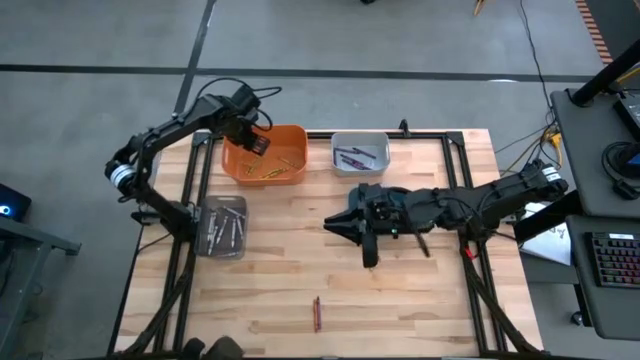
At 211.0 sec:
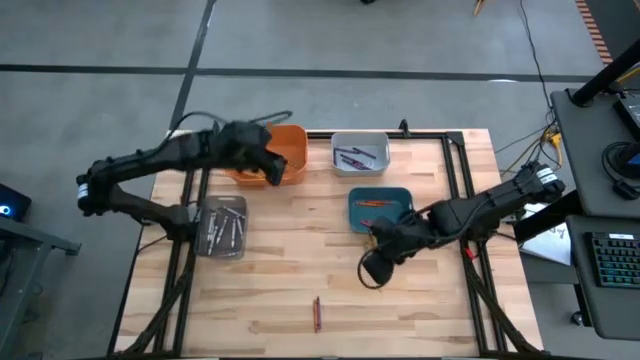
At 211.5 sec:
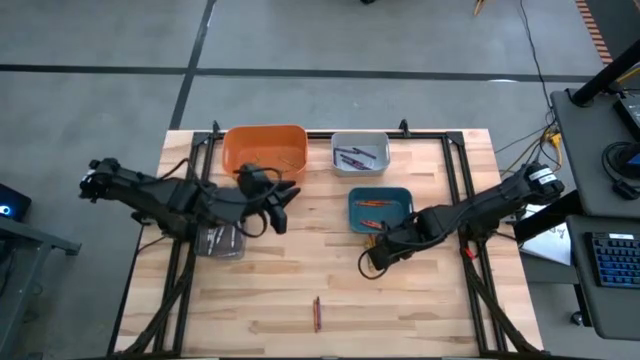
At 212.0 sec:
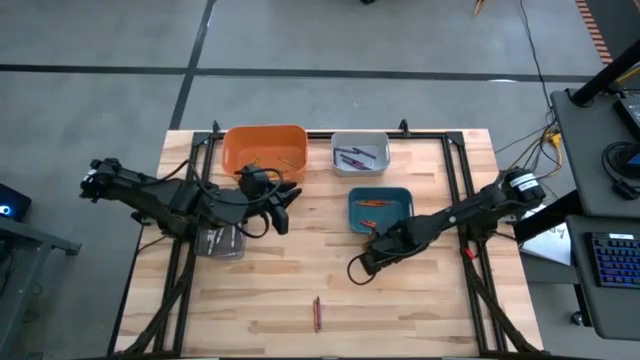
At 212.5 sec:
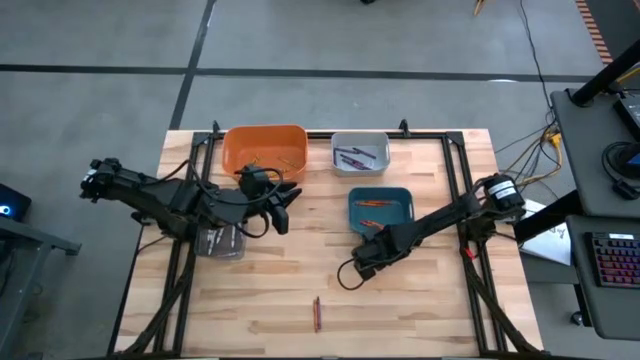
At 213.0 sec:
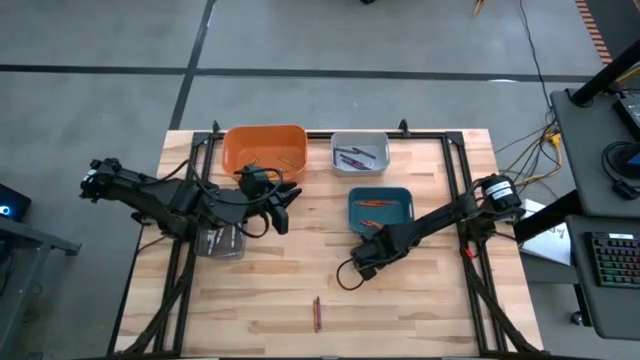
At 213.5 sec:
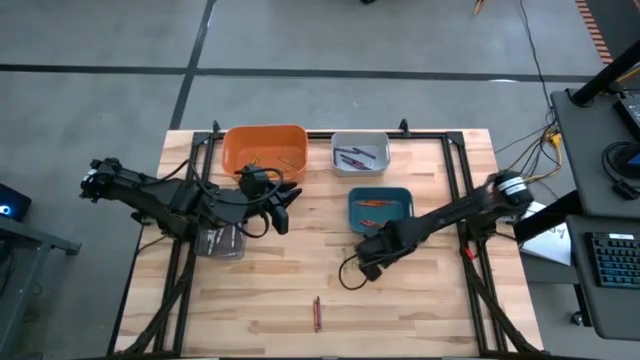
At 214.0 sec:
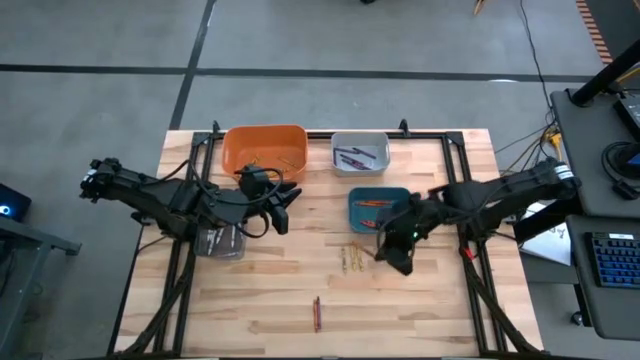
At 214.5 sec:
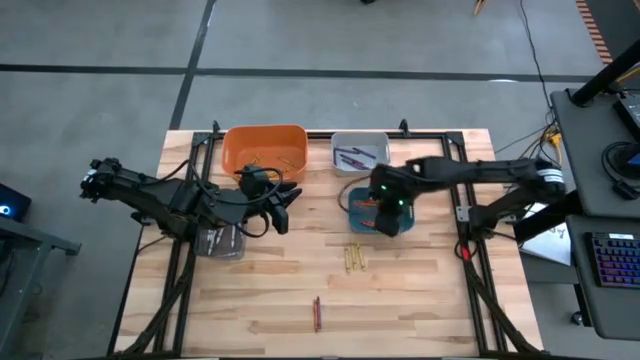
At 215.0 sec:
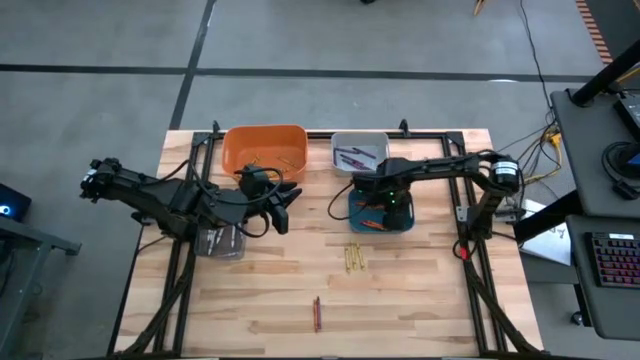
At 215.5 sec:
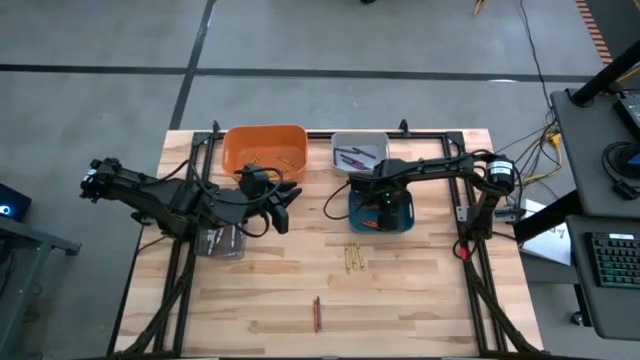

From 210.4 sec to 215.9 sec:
Task: Sort crayons
Put the orange crayon into the blue bin

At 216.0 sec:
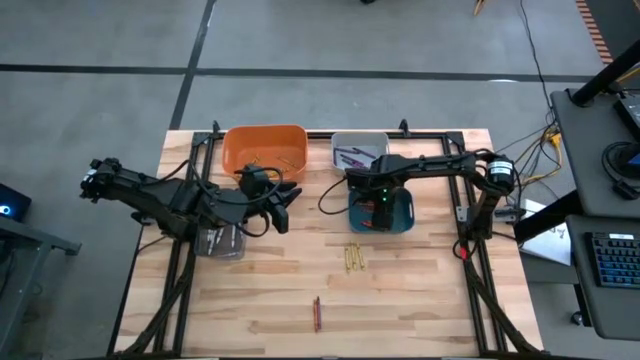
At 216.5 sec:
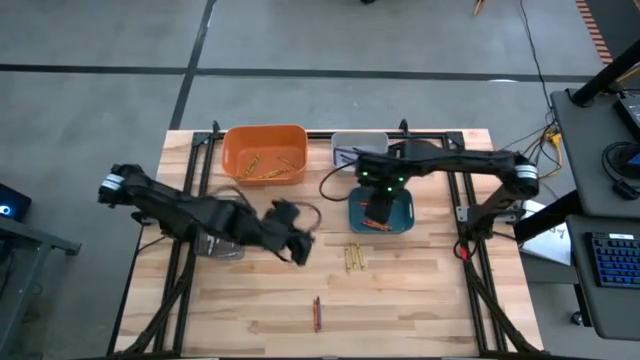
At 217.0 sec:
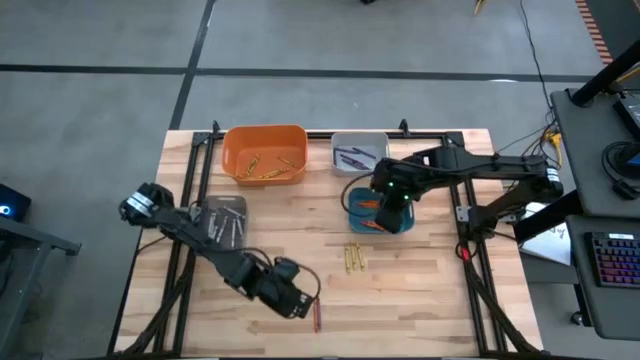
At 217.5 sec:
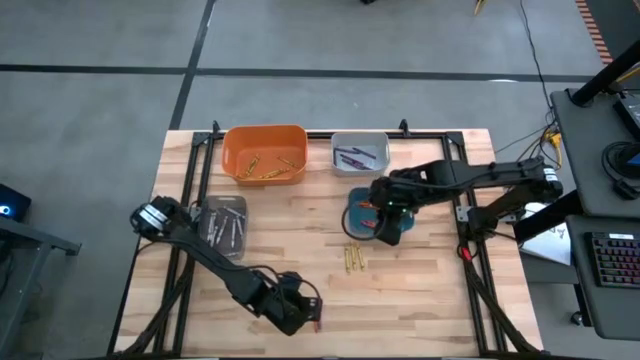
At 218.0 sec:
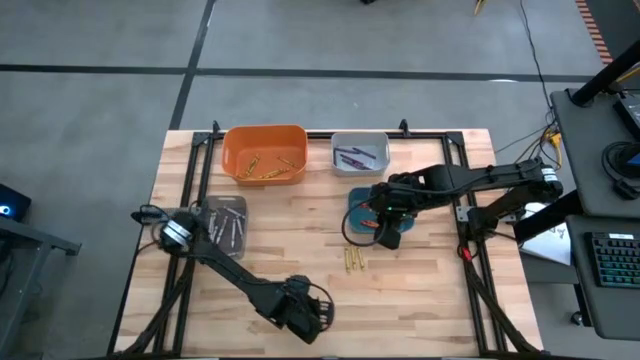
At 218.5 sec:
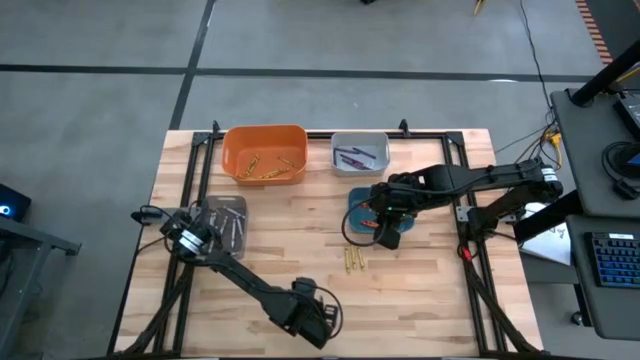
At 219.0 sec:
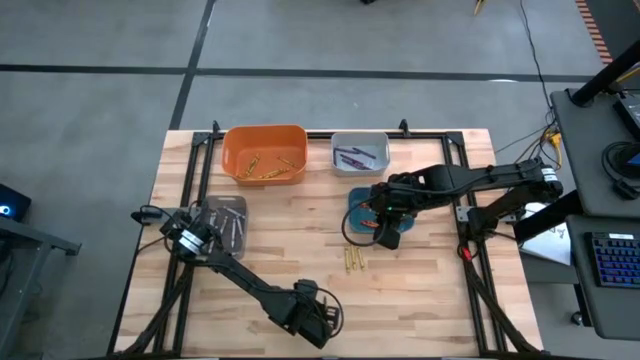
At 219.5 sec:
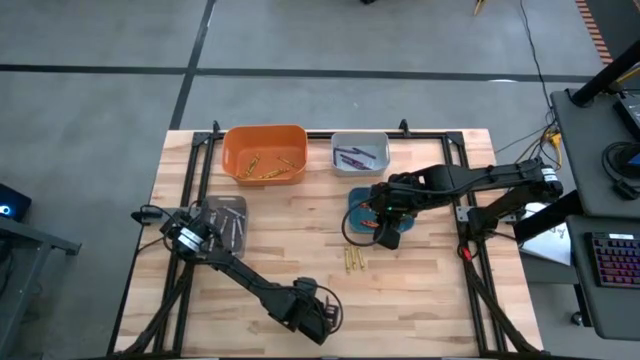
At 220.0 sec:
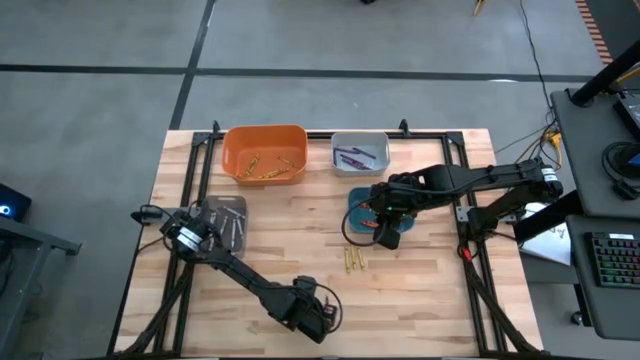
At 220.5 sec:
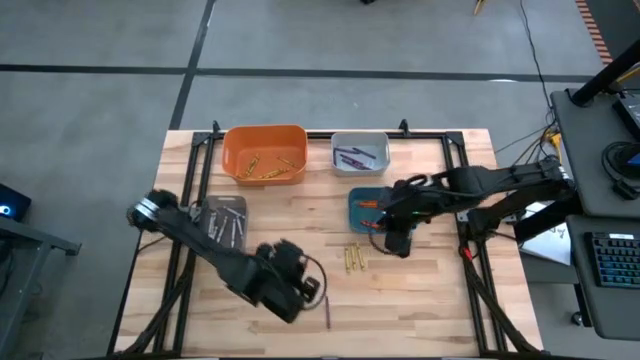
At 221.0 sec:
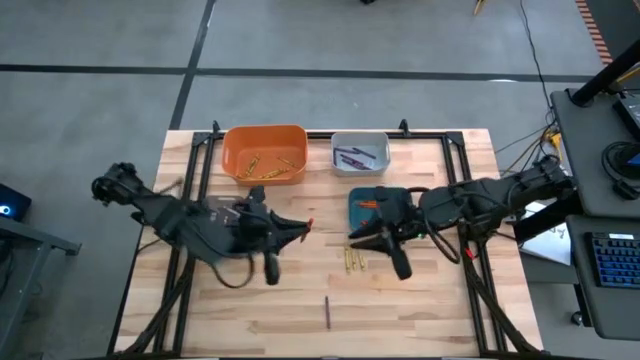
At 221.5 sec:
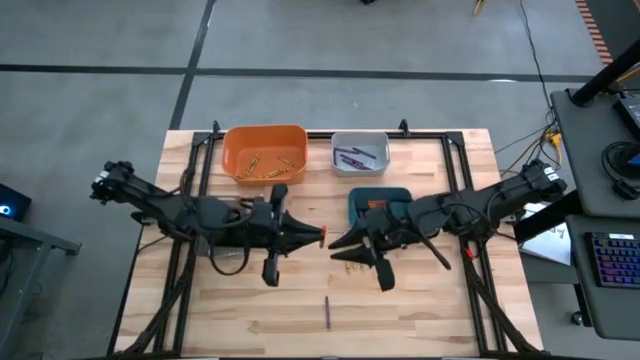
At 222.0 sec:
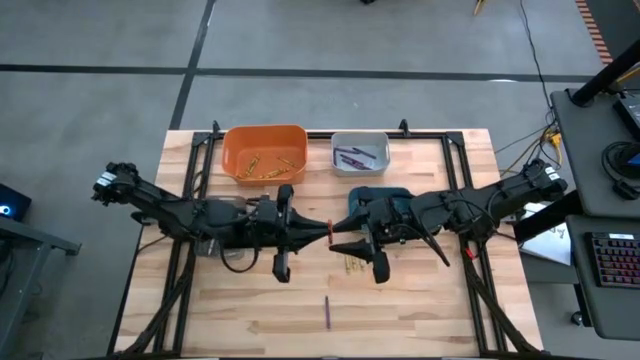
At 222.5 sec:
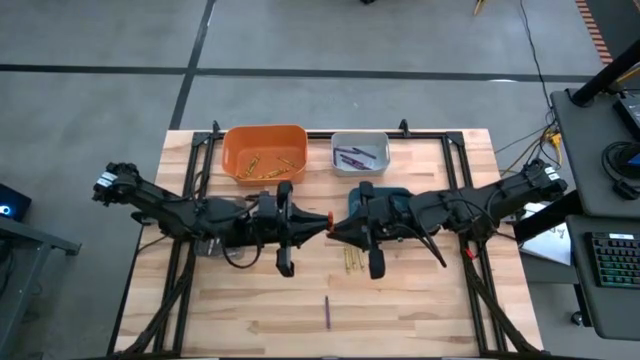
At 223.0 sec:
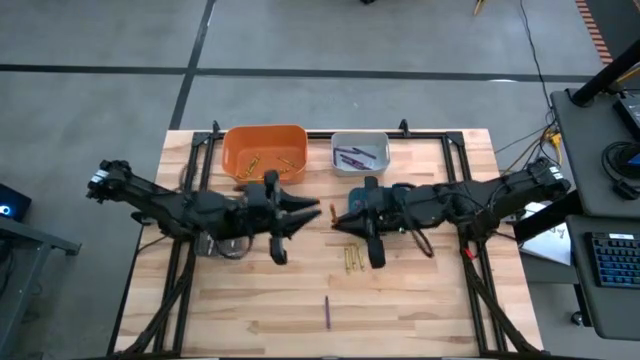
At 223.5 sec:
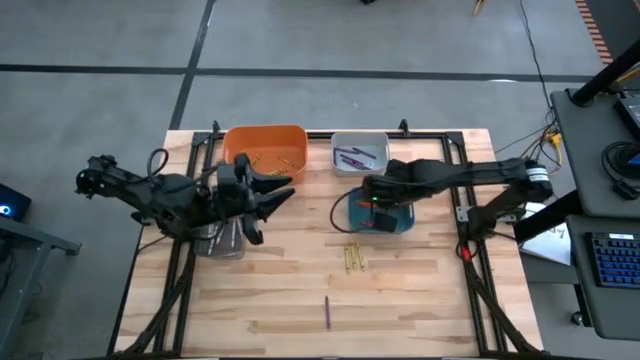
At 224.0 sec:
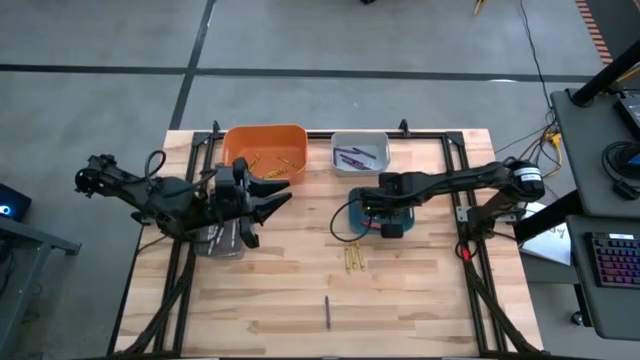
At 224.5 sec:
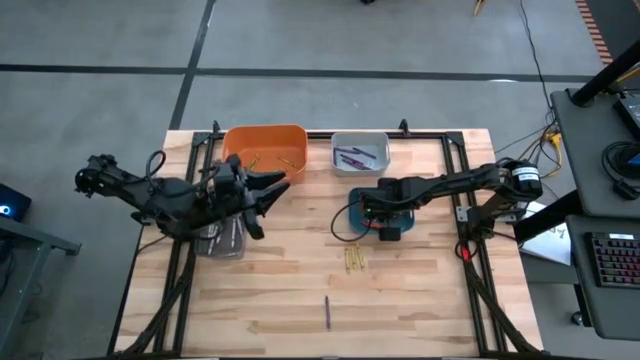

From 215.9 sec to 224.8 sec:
Put the orange crayon into the blue bin

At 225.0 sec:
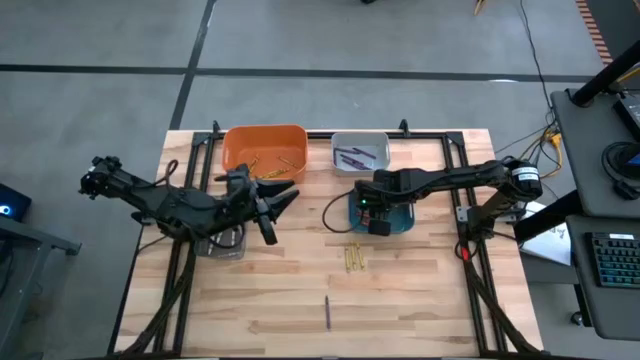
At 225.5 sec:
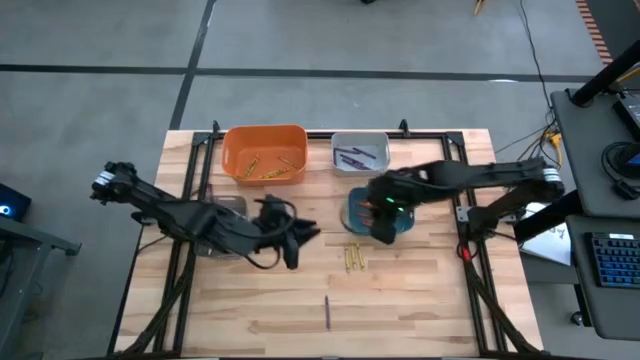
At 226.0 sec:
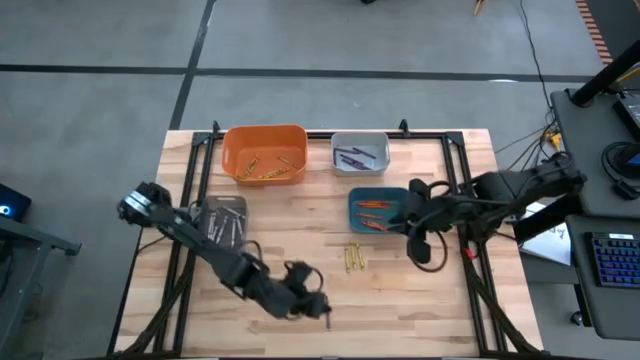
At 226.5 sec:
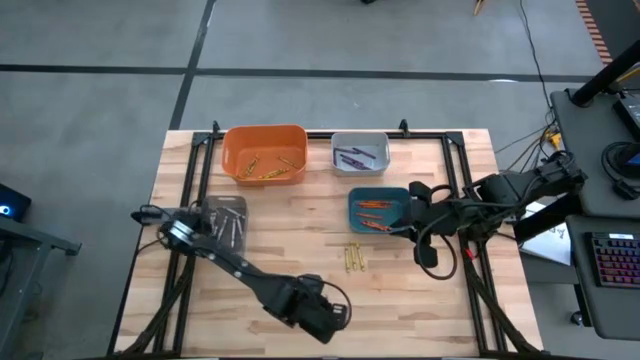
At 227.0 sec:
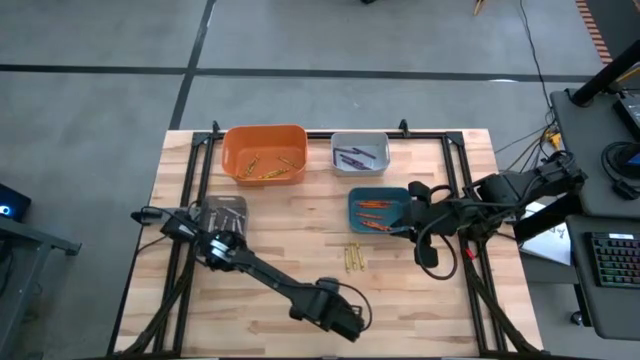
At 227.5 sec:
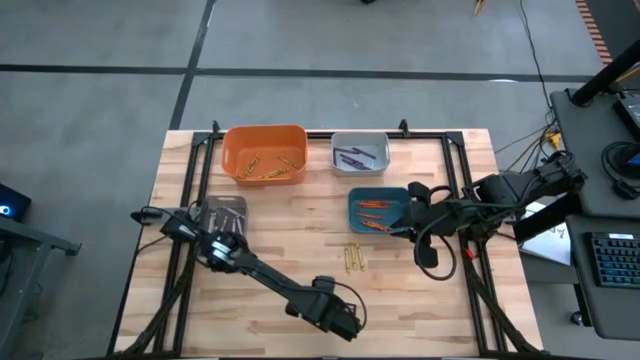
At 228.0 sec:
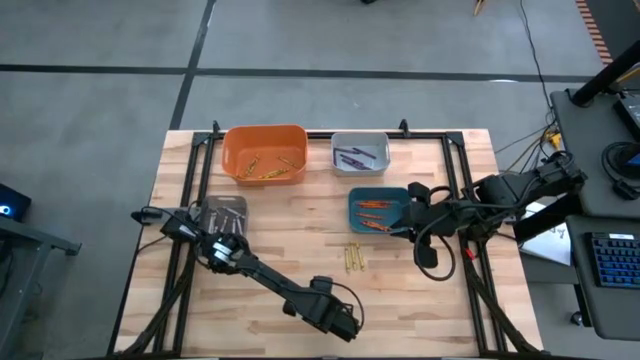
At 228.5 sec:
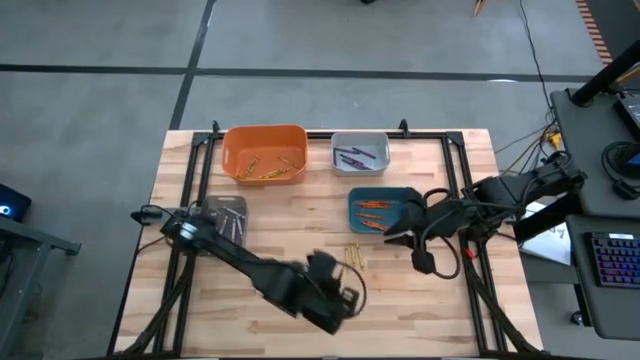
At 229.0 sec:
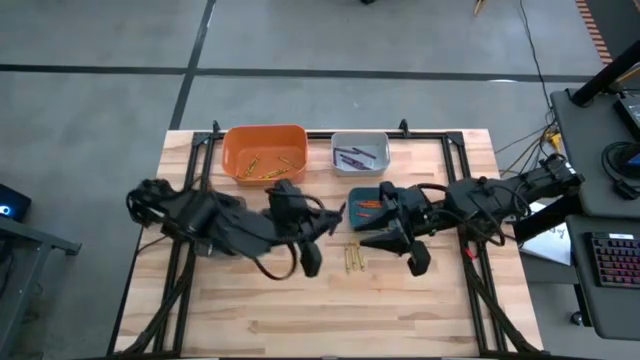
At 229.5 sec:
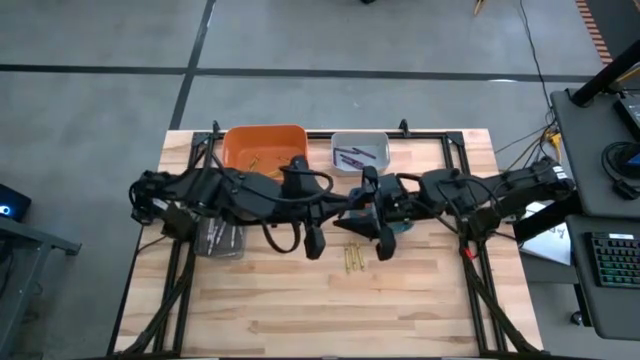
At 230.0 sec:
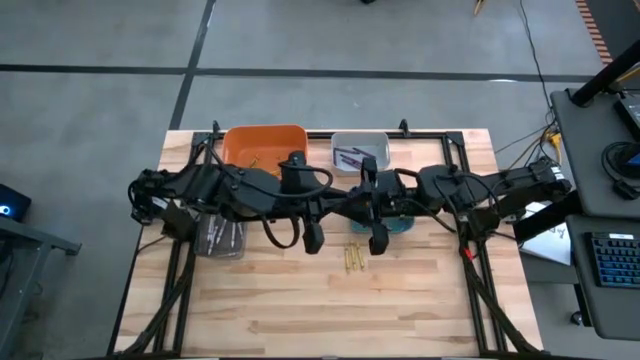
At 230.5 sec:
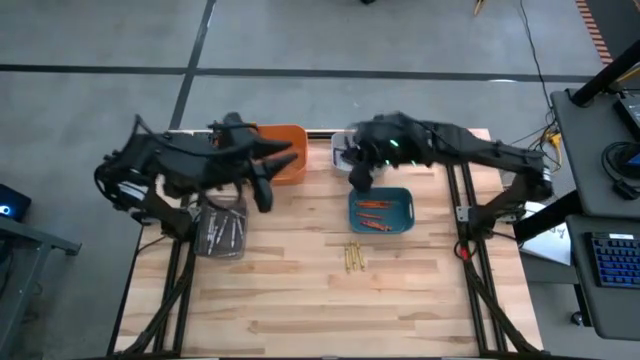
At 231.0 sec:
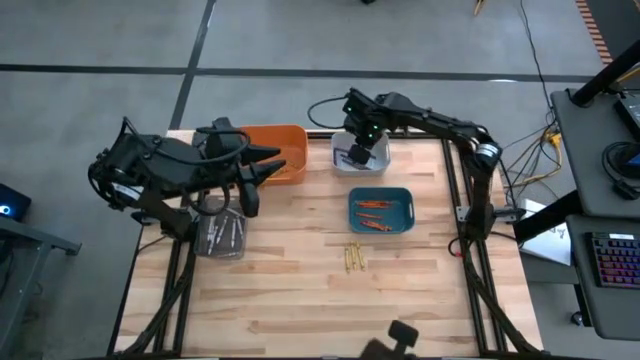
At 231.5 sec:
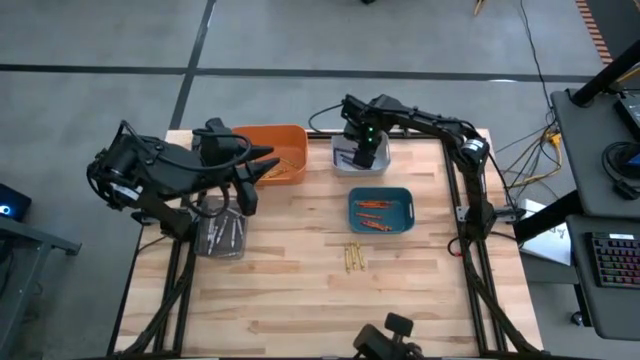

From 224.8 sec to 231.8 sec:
Put the violet crayon into the gray bin
